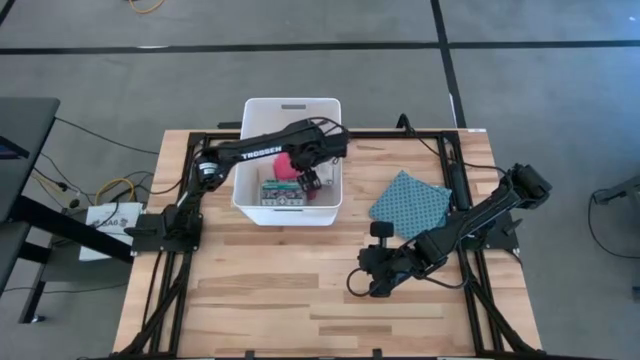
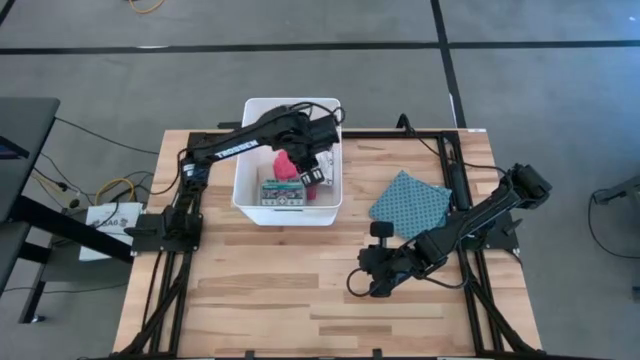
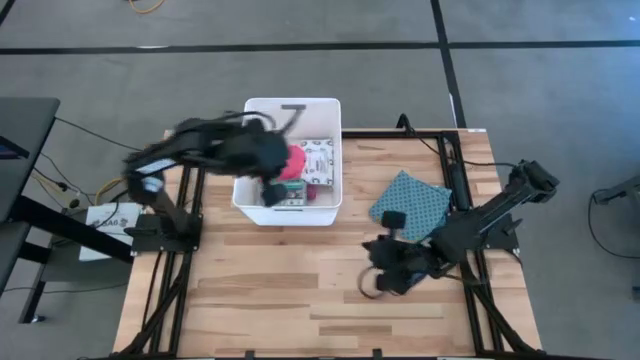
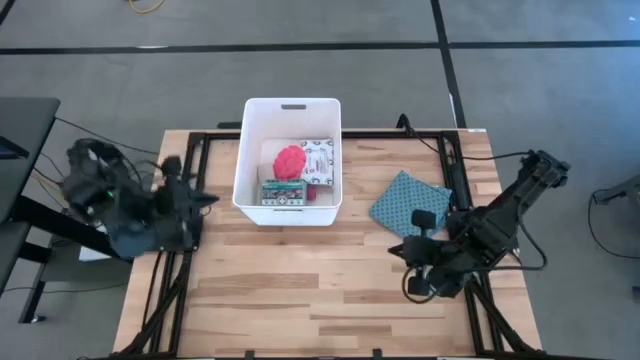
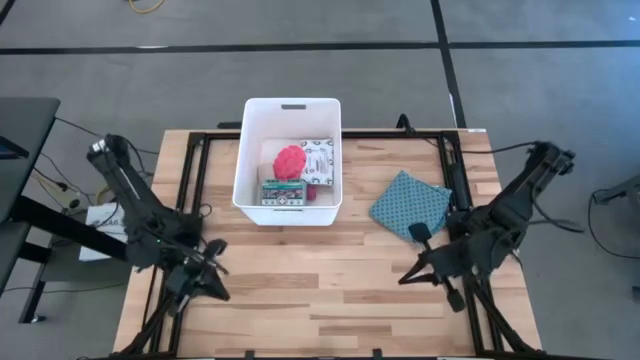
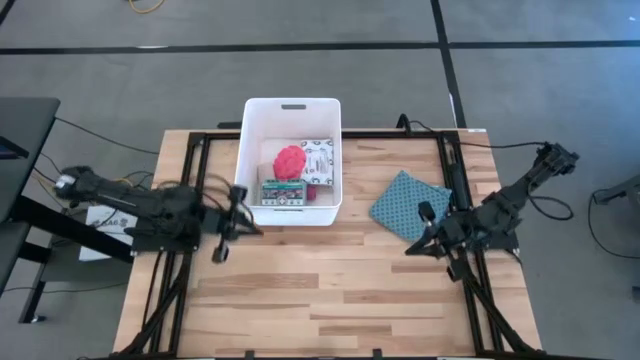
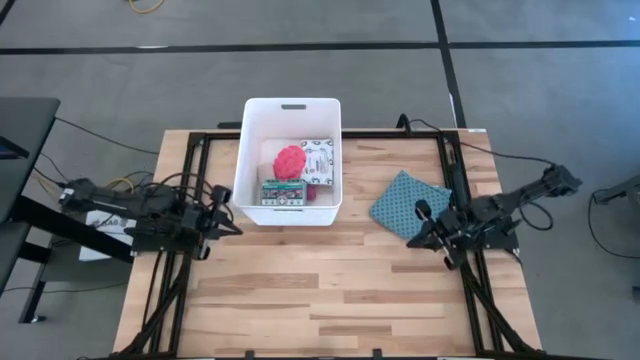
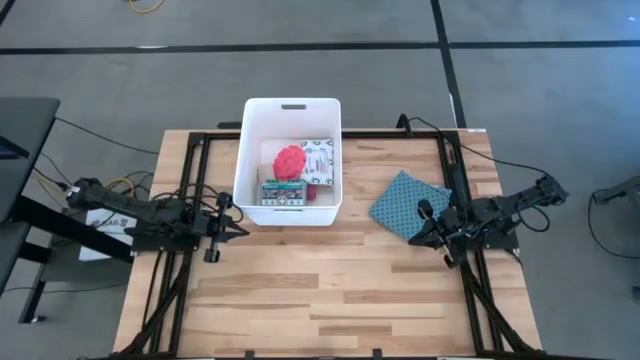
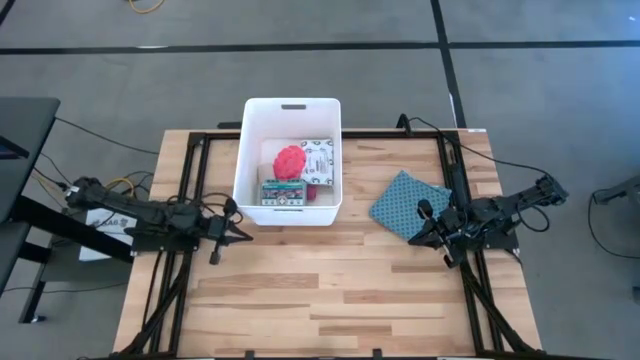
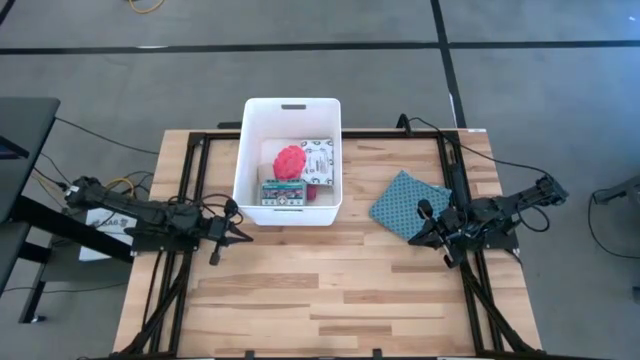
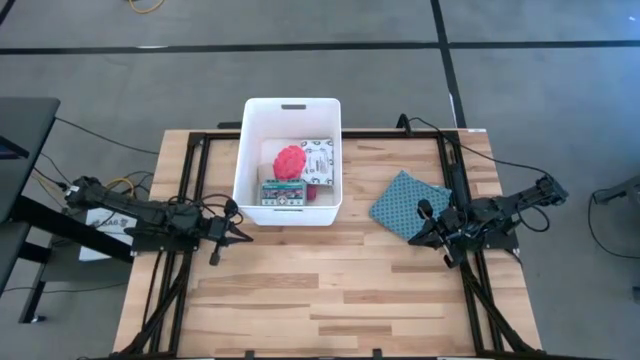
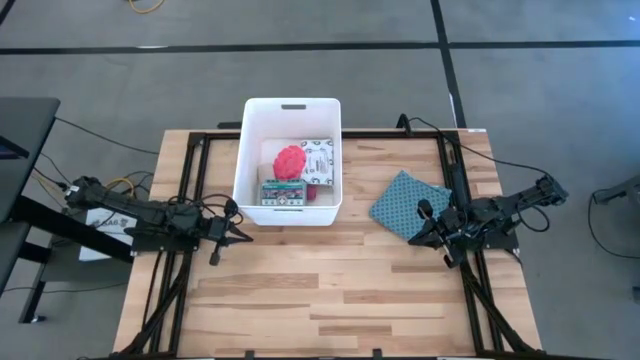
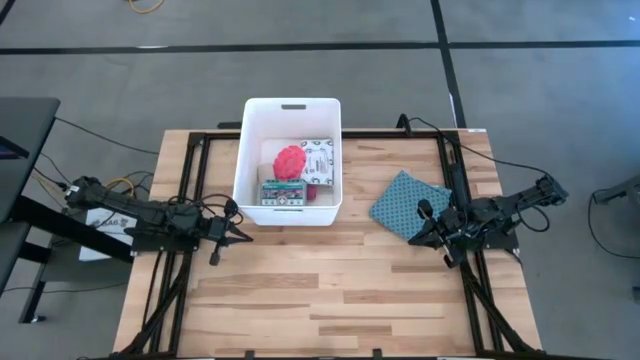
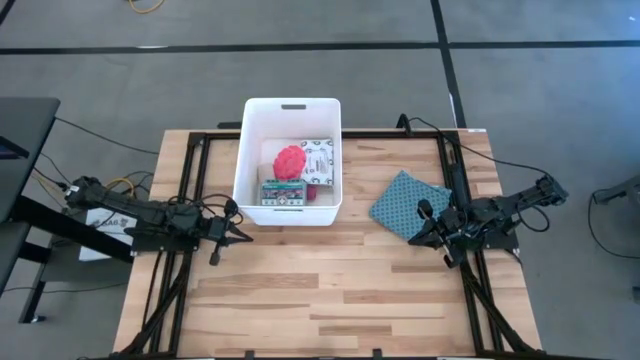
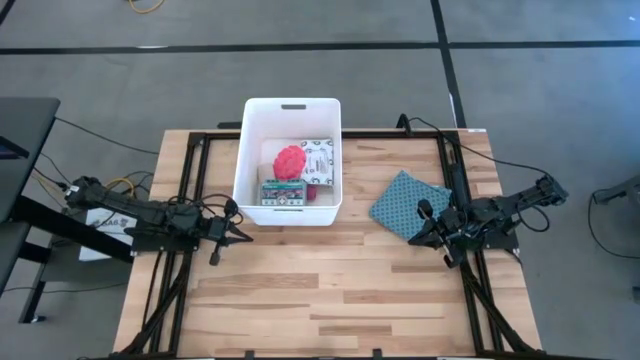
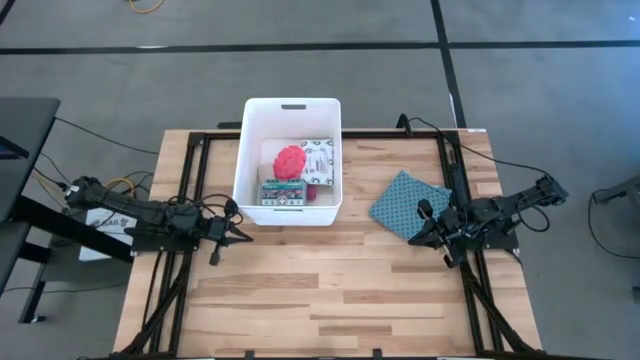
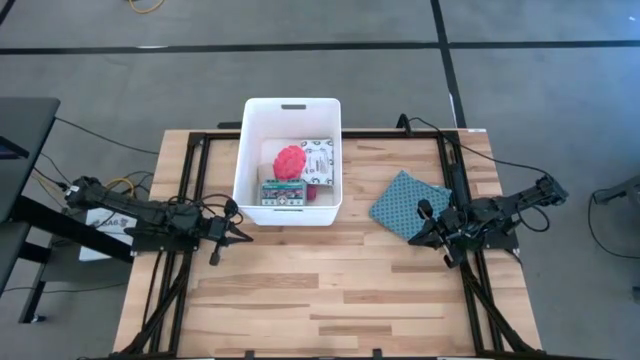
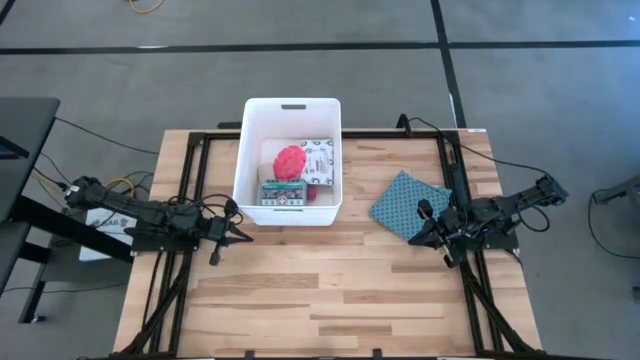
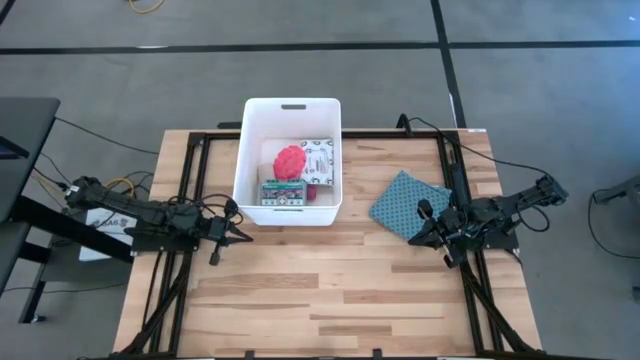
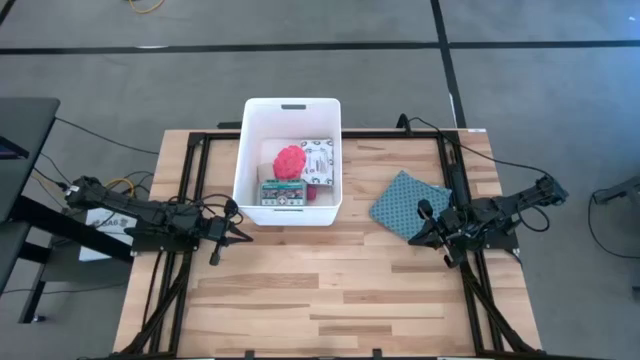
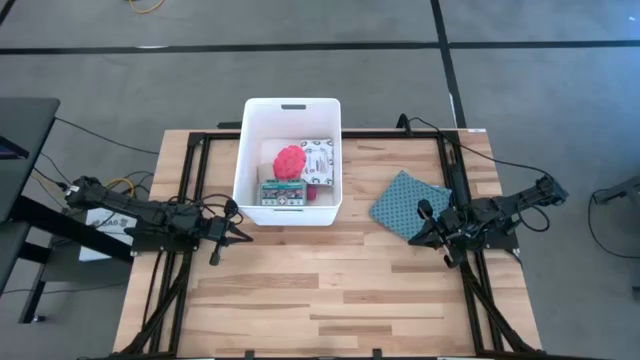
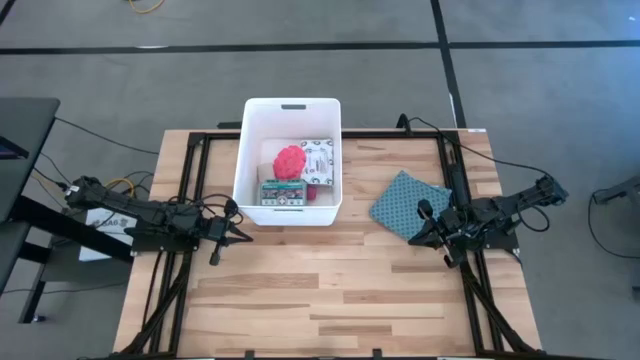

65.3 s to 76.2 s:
Task: Pick & place medical supplies in basket/bin
Return to Home Position

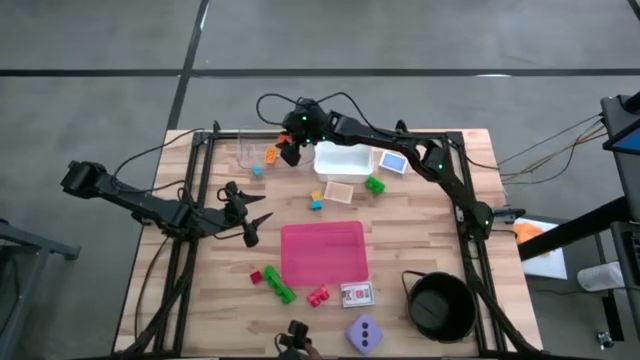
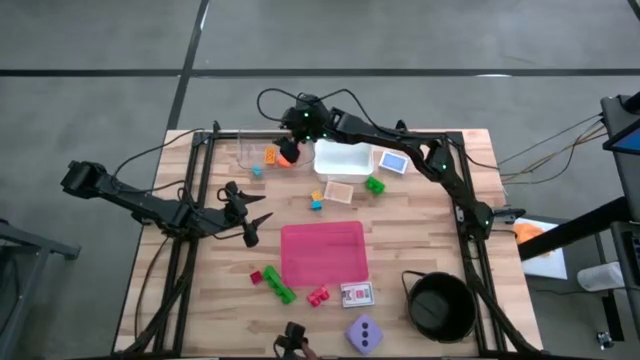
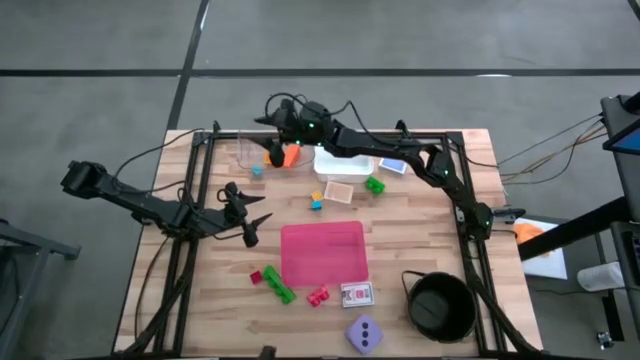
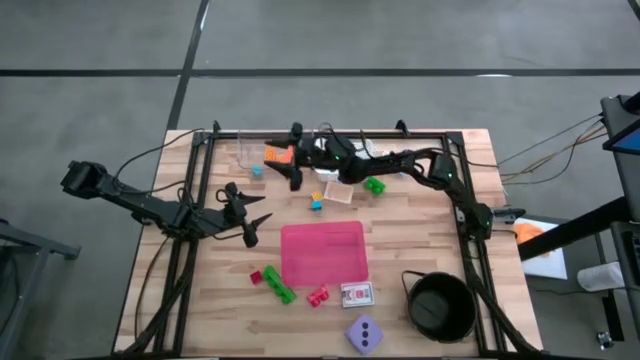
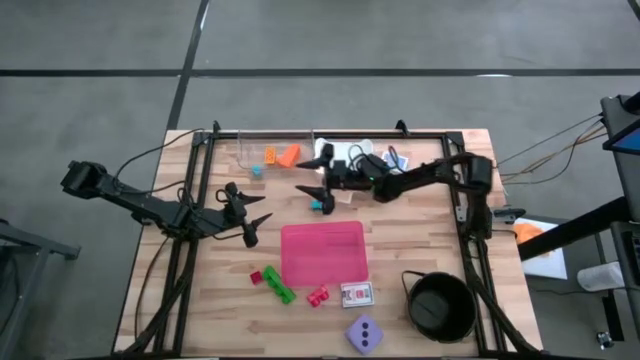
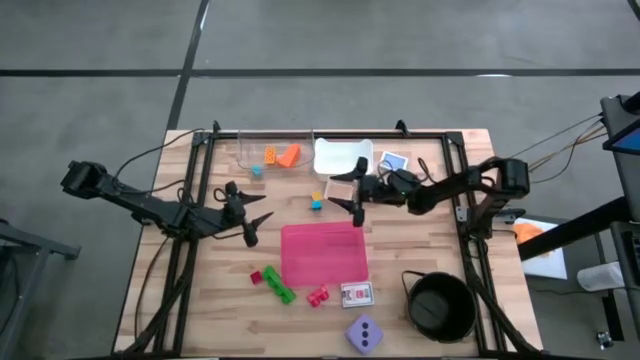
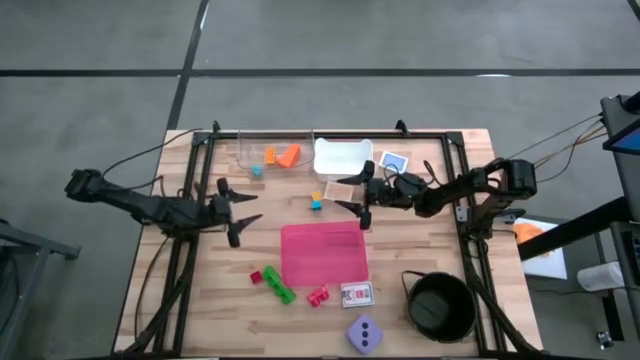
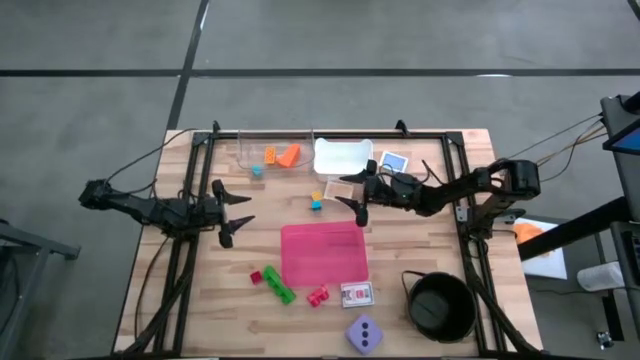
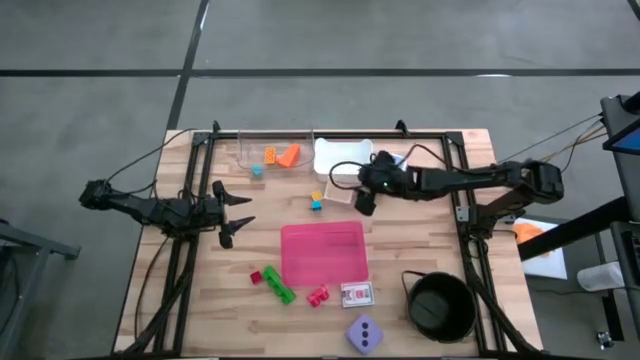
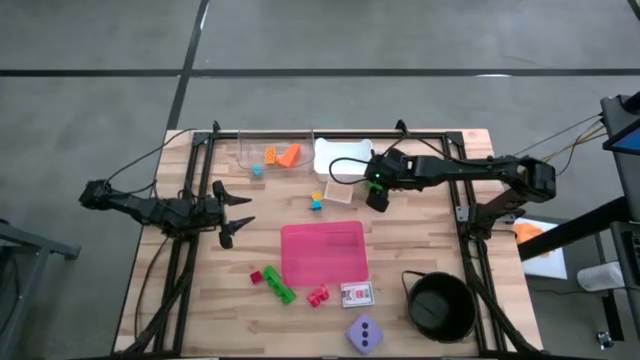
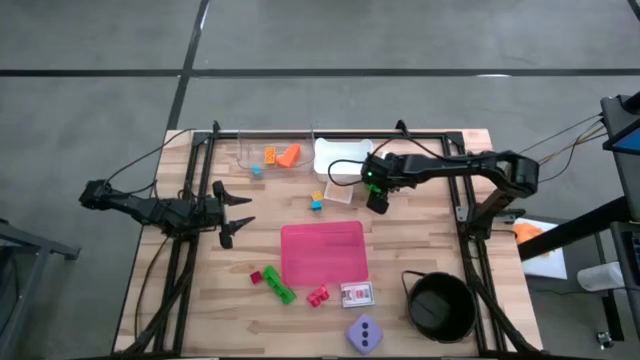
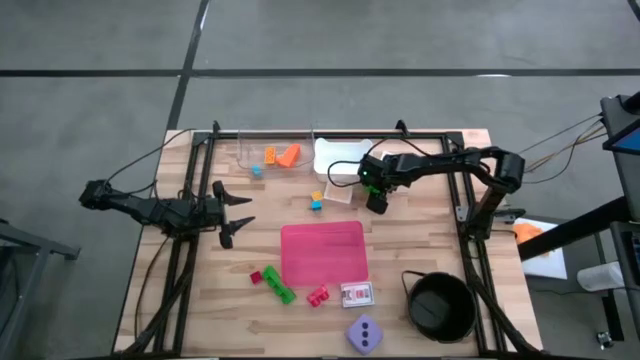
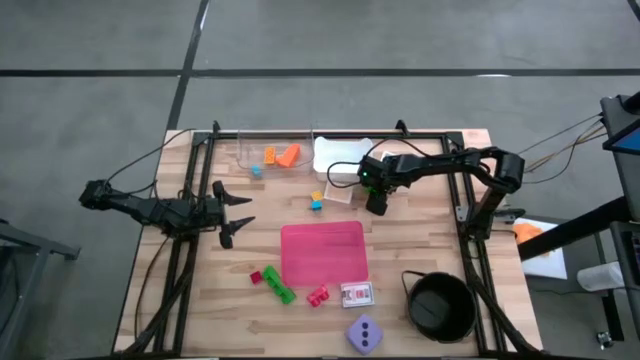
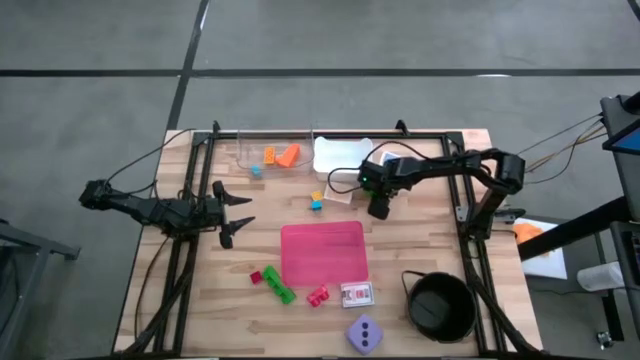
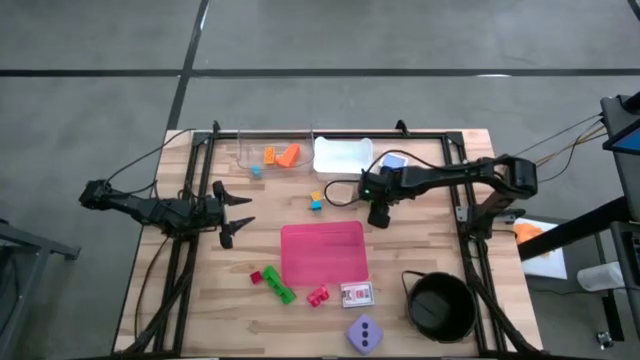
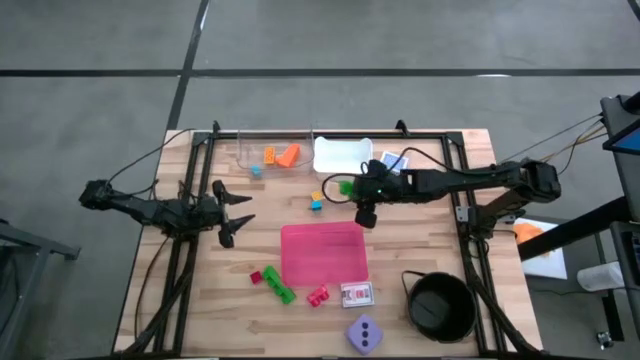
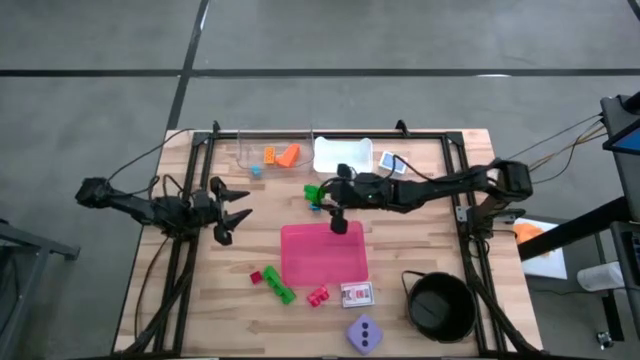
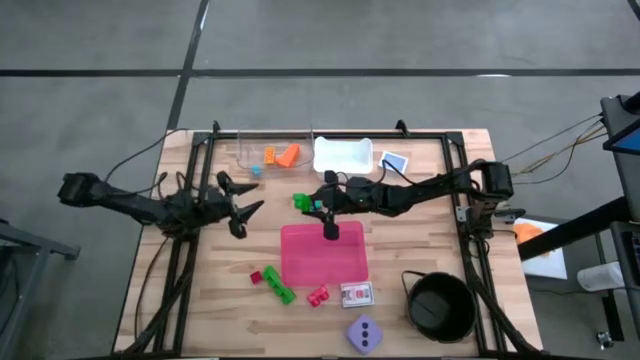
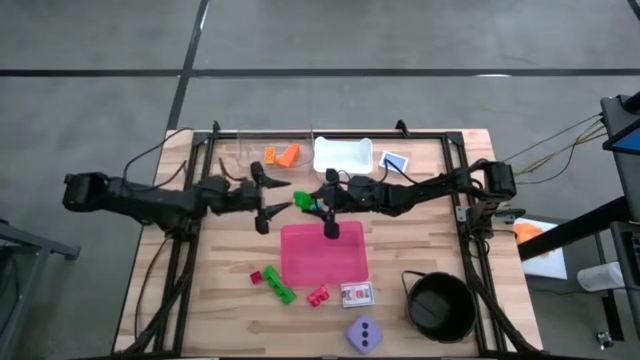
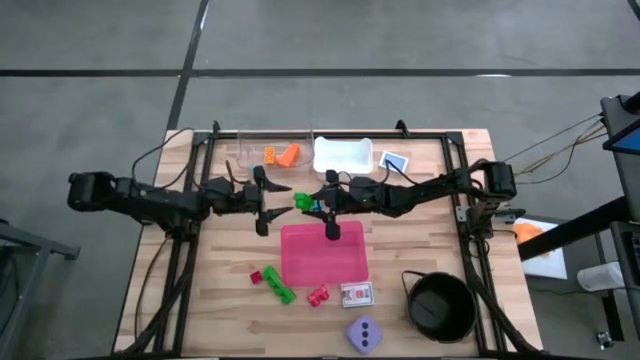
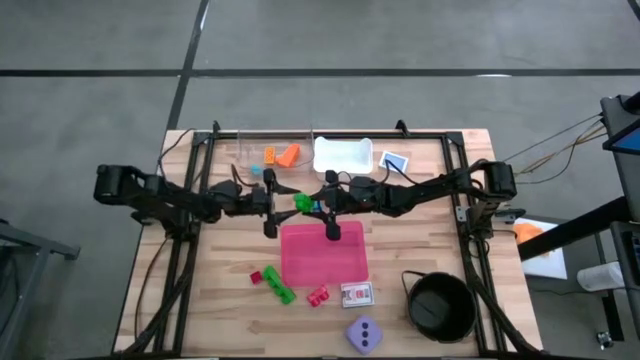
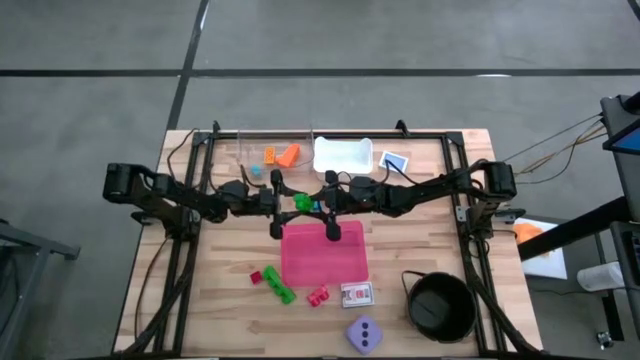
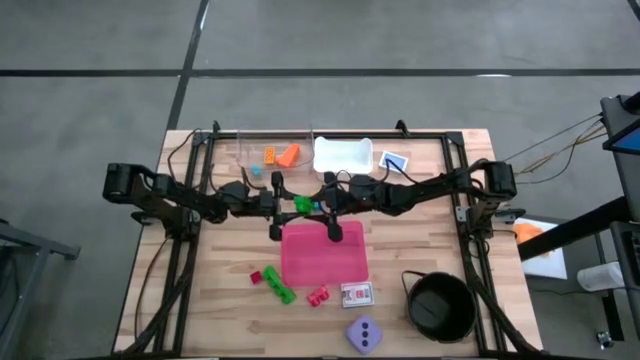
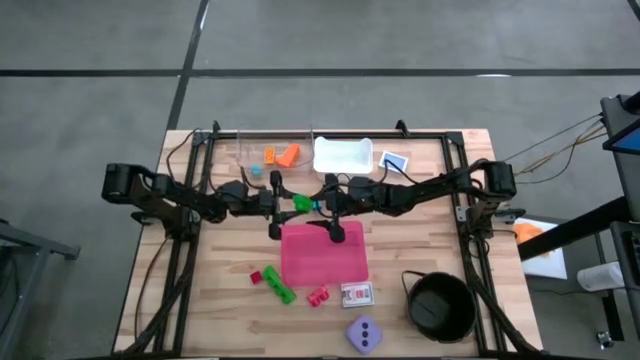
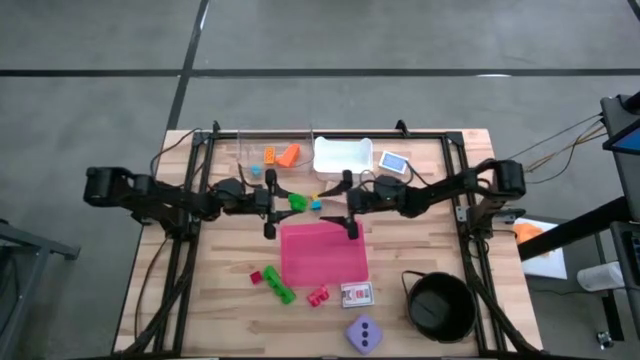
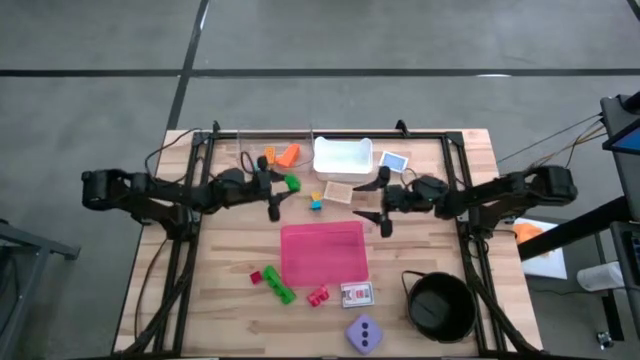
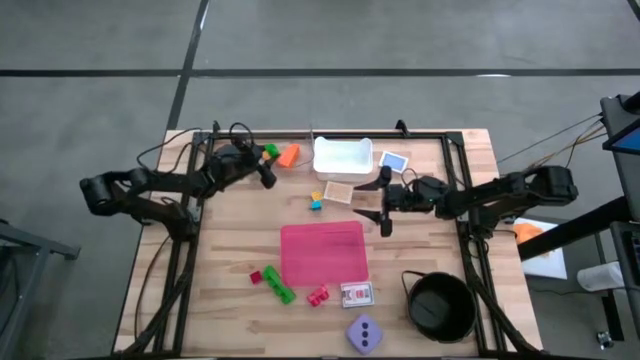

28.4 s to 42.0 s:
Task: Pick & Place Toys
Put the top green game piece into the transparent bin
